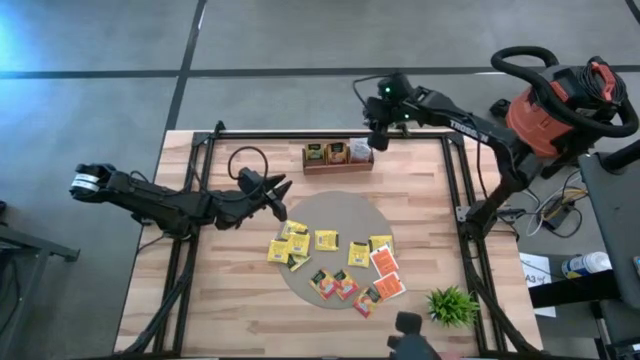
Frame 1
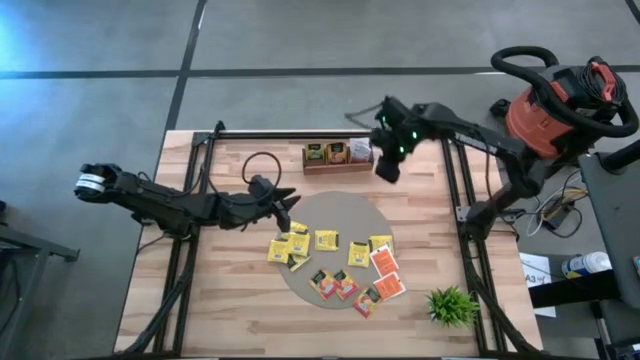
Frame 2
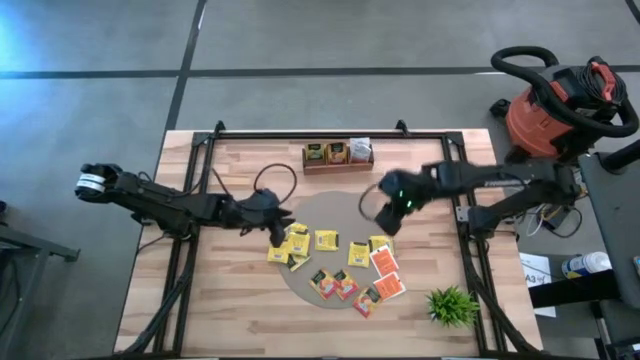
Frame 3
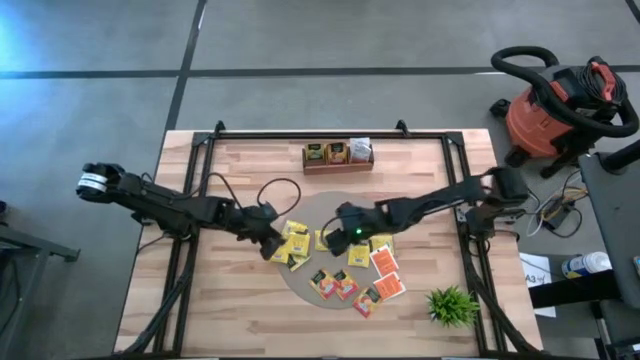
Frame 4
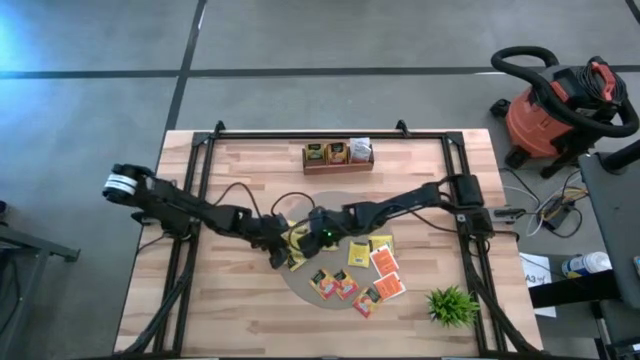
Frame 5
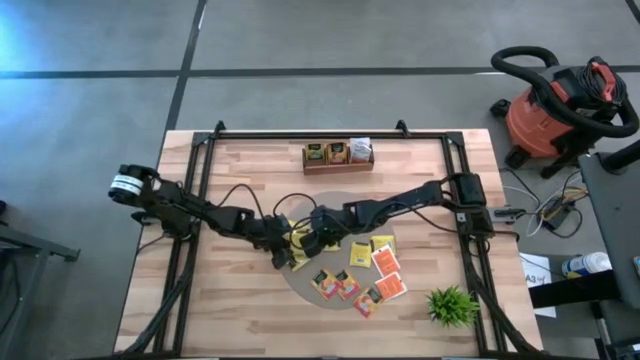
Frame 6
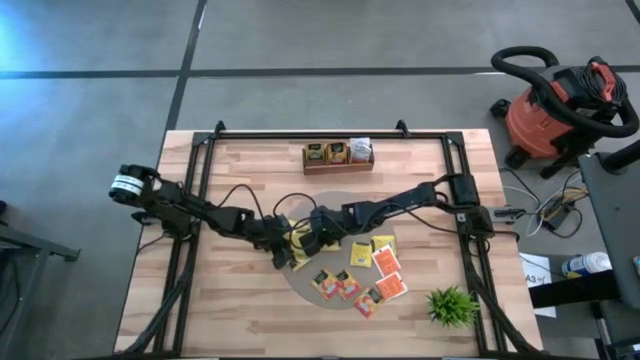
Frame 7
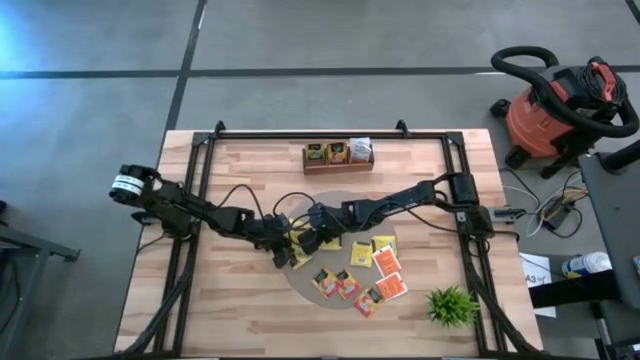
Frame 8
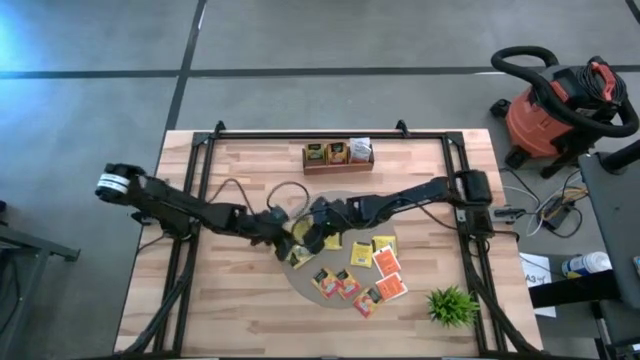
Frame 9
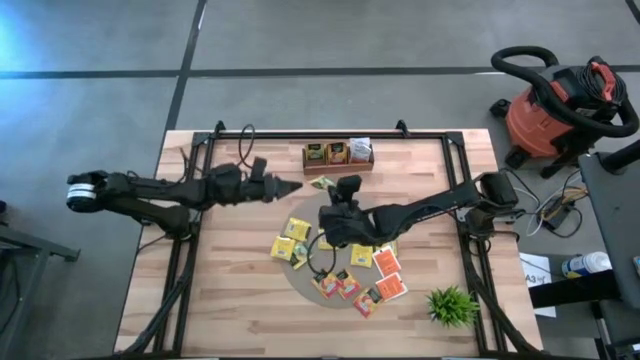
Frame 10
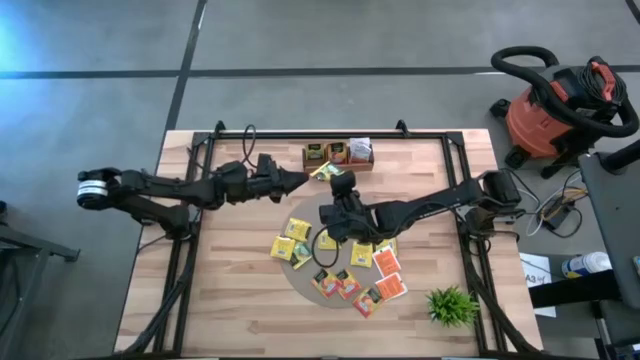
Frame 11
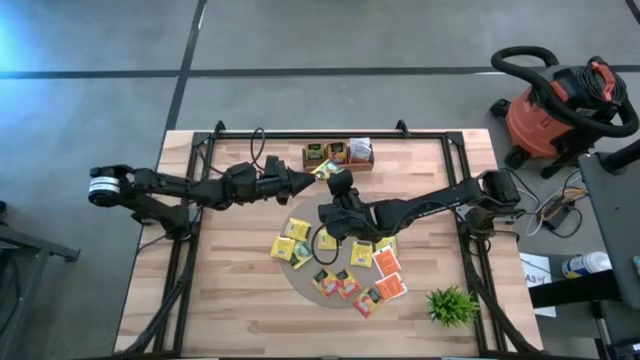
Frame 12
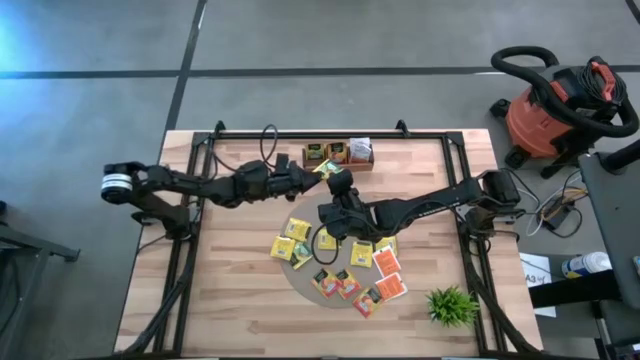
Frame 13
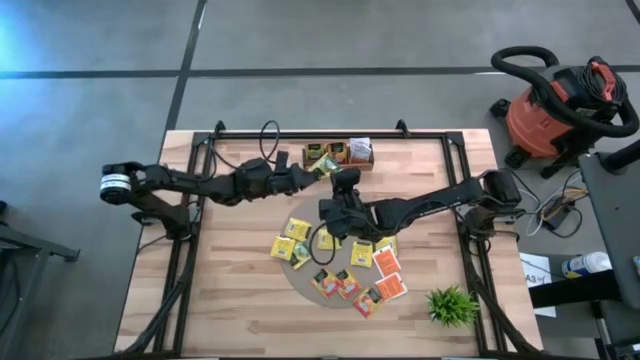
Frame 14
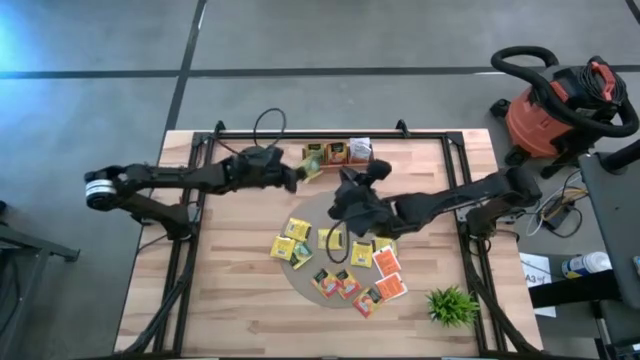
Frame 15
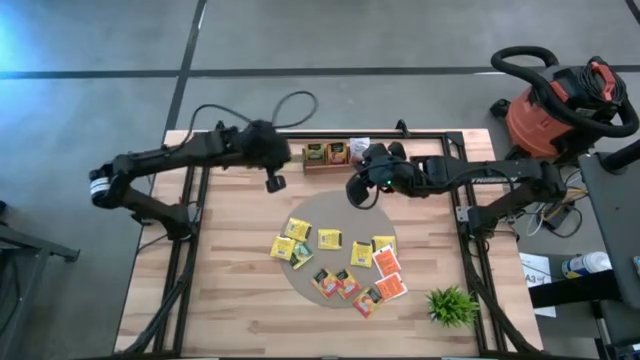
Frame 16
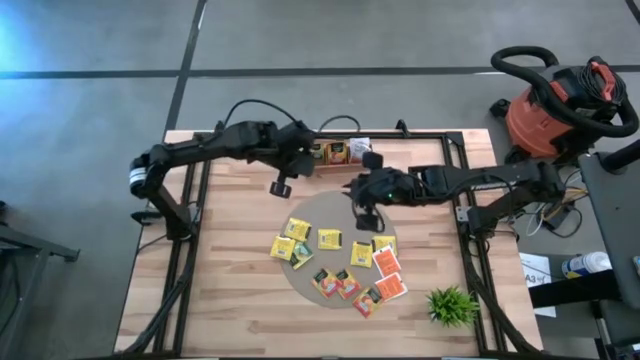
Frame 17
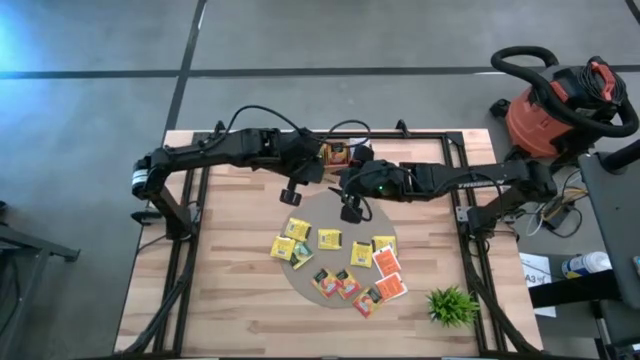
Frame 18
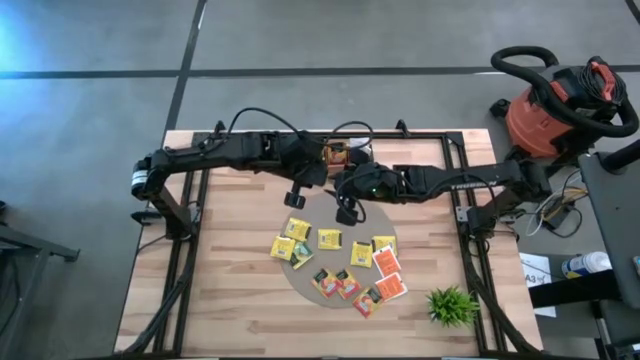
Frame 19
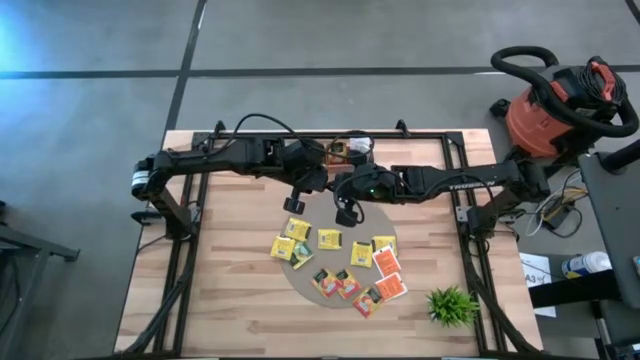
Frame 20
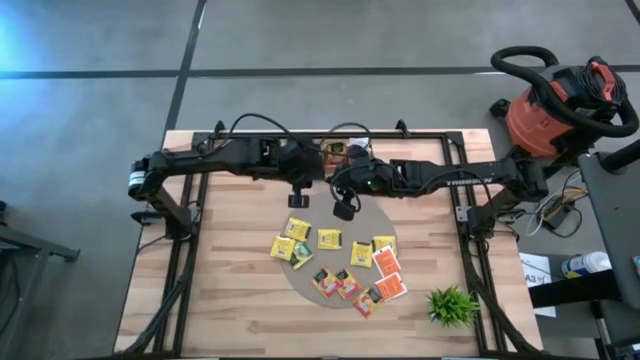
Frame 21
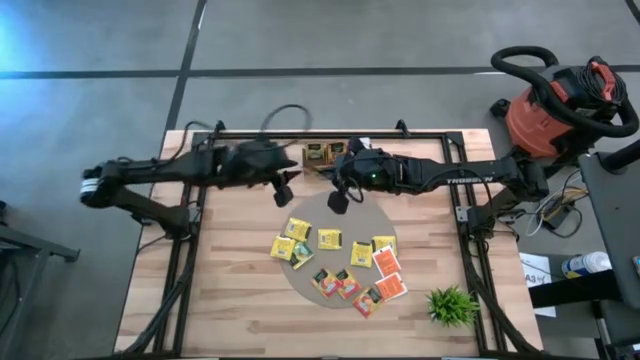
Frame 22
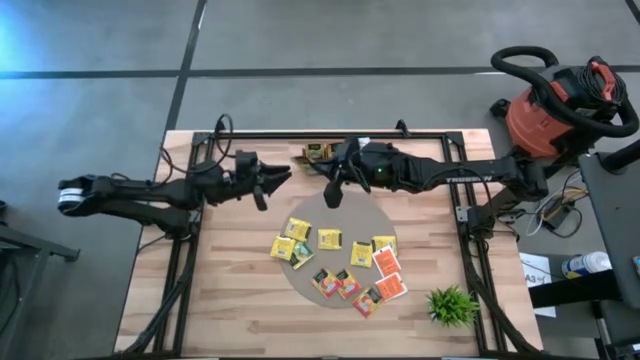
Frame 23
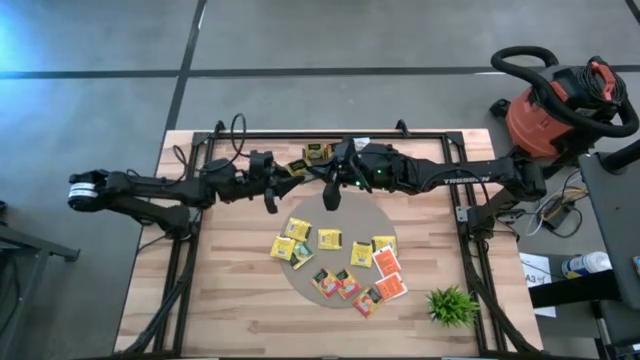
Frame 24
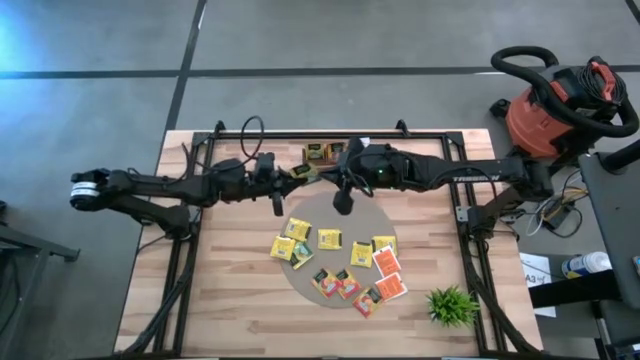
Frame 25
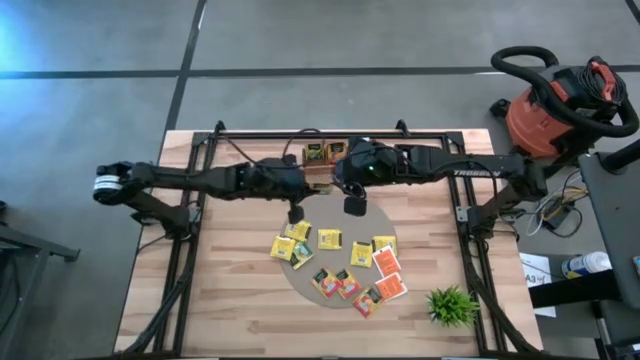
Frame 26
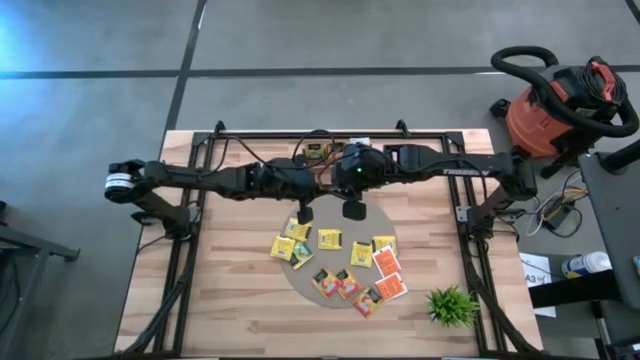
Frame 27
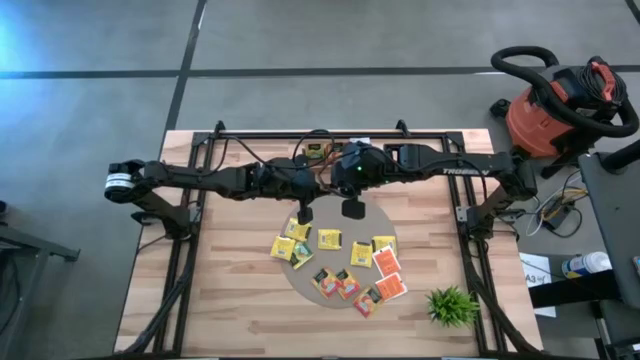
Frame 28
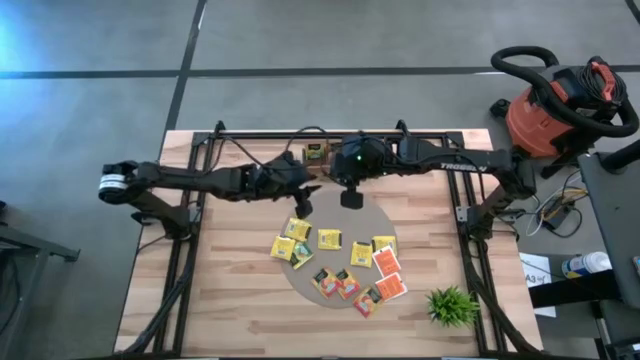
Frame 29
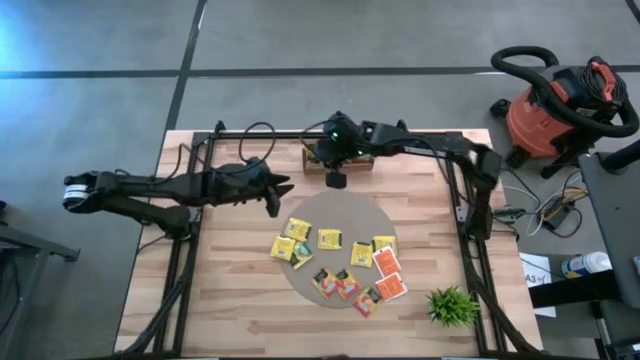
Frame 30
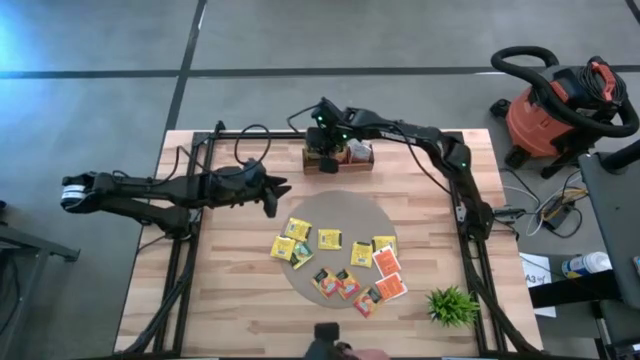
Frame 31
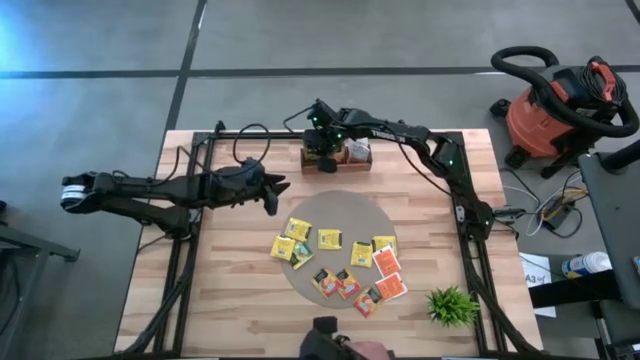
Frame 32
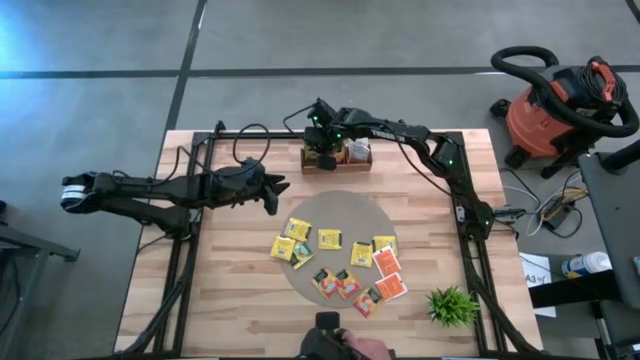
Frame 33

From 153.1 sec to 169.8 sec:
Task: Pick & Place Tea
Put the yellow tea bag into the left compartment of the wooden organizer

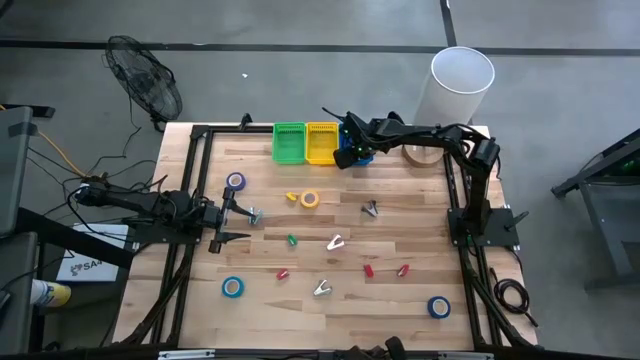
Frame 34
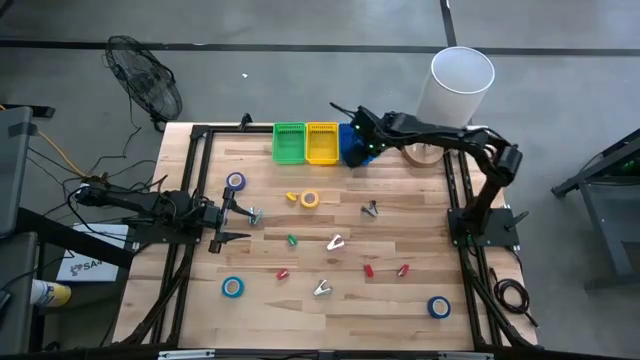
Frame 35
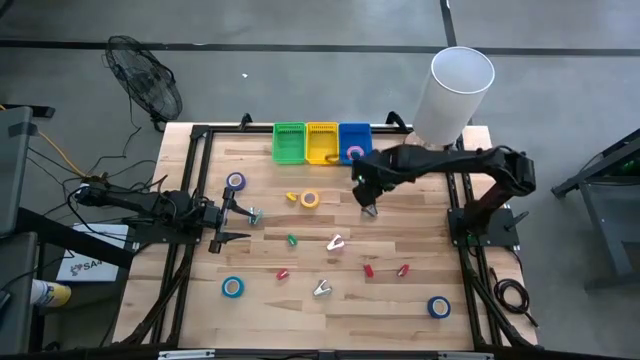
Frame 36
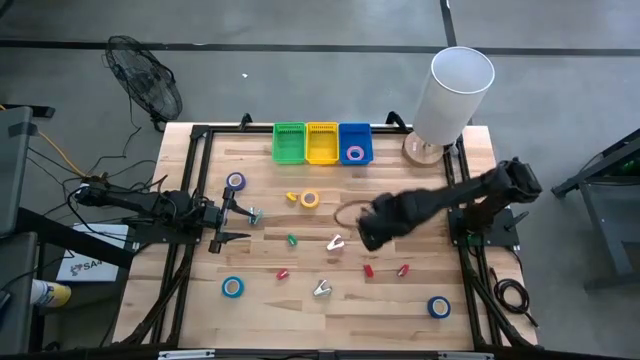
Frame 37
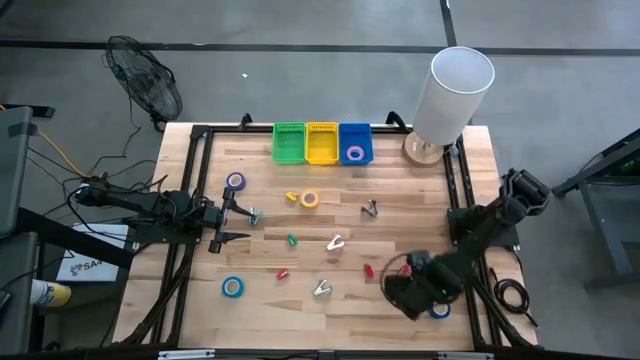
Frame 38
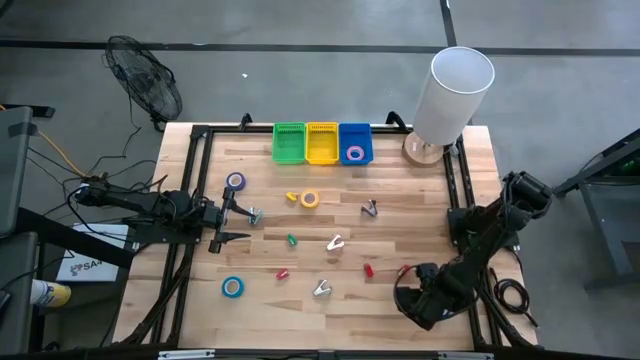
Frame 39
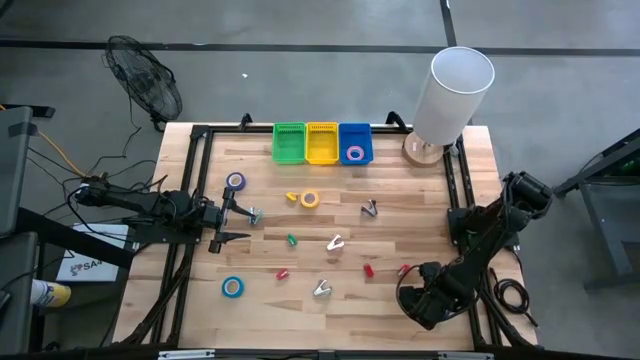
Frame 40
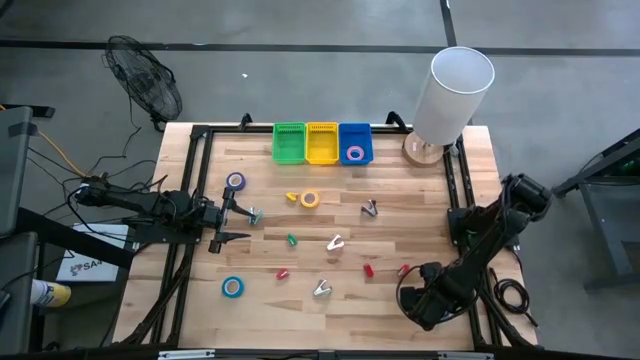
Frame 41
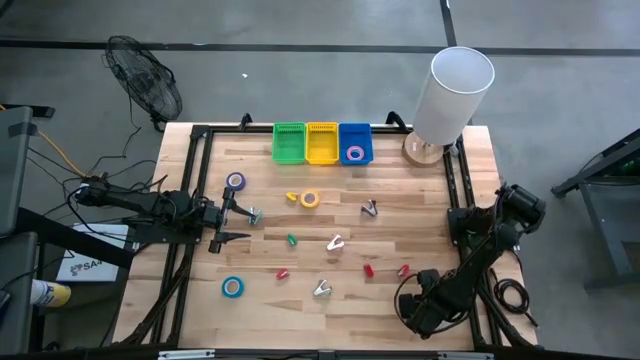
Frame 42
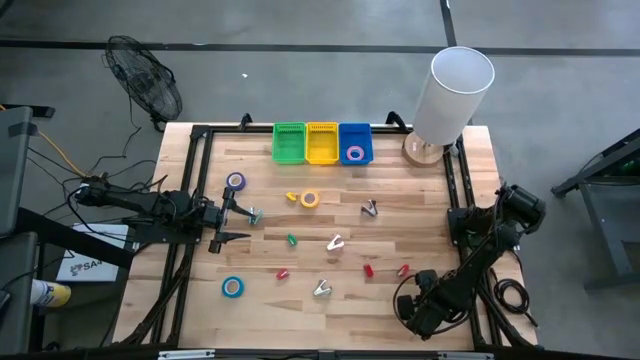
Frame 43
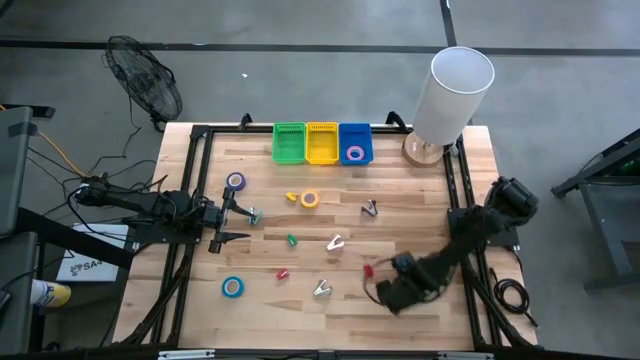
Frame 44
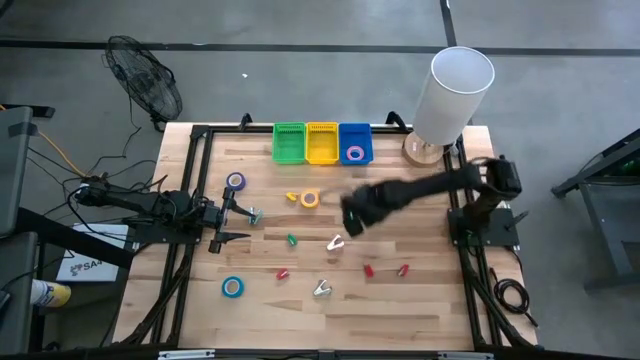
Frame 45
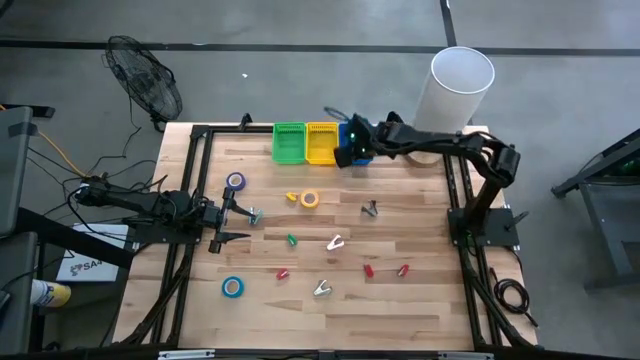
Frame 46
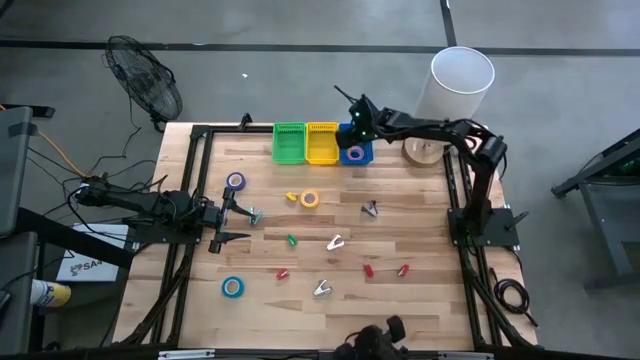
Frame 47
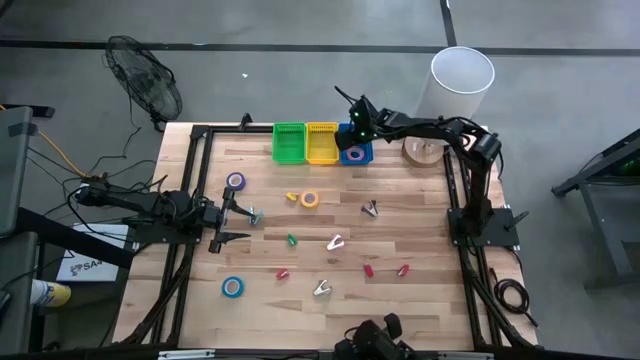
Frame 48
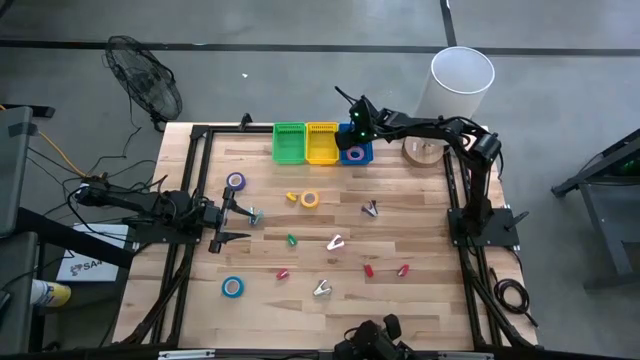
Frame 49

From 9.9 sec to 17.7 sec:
Task: Pick and place Stapler, Stapler remover, tape
Put the blue tape into the blue bin
